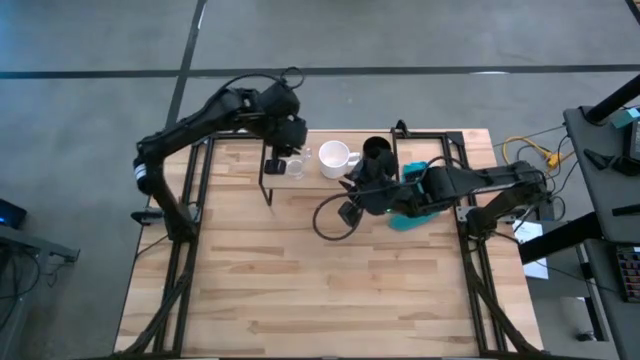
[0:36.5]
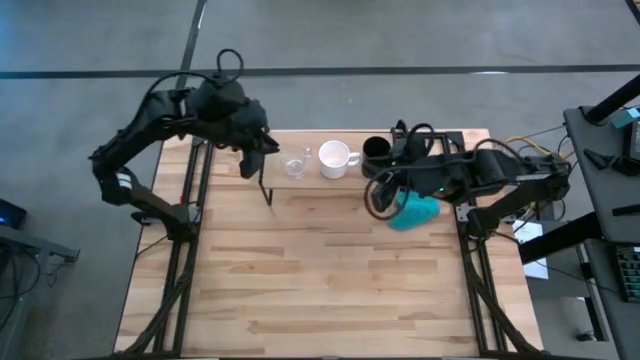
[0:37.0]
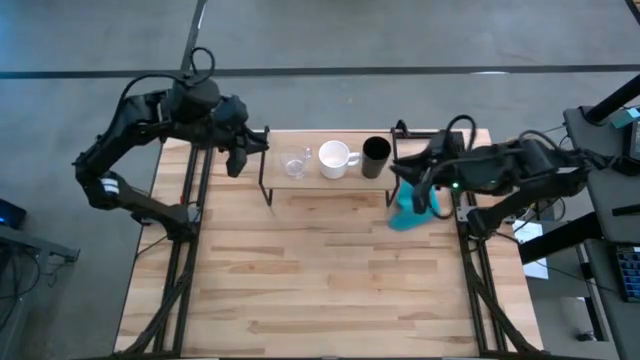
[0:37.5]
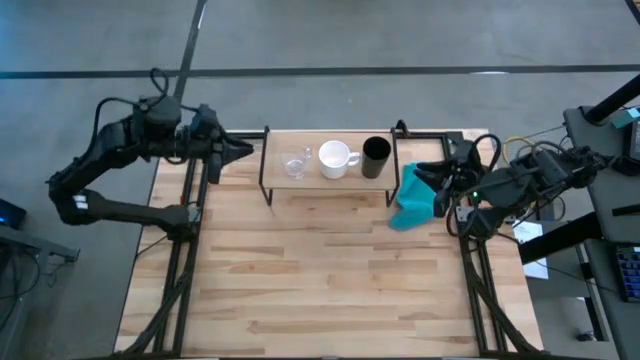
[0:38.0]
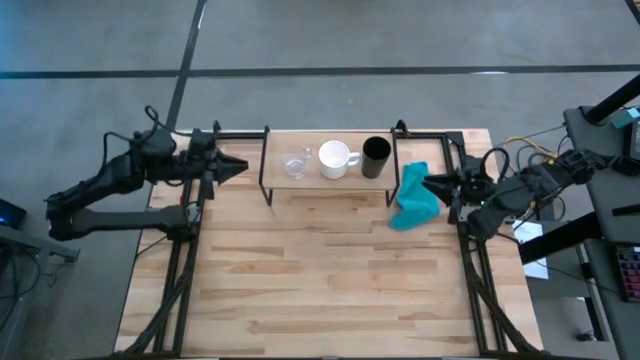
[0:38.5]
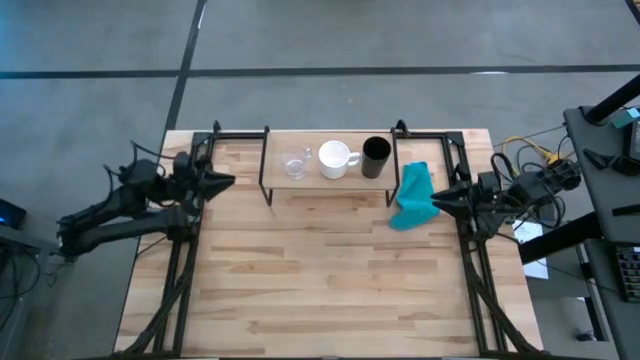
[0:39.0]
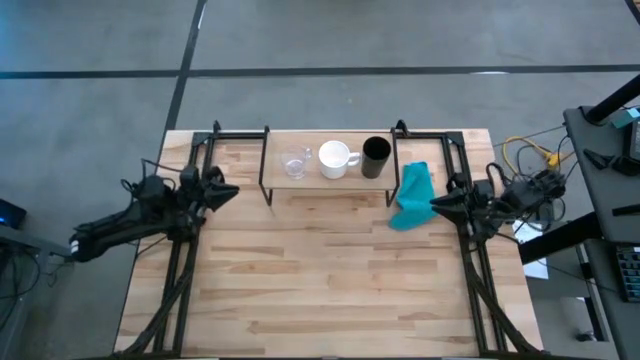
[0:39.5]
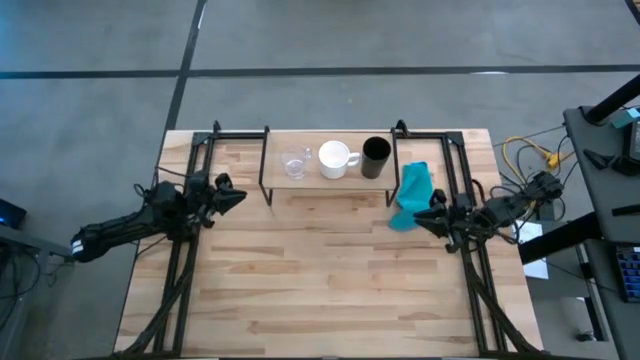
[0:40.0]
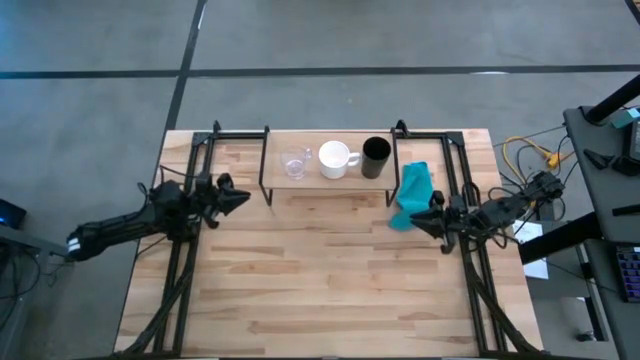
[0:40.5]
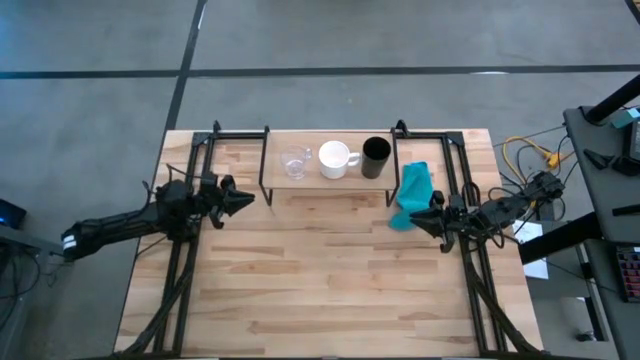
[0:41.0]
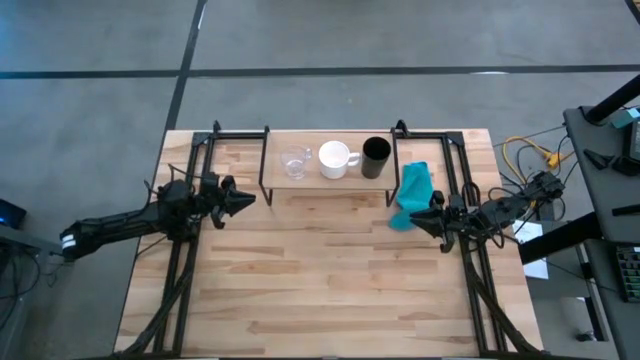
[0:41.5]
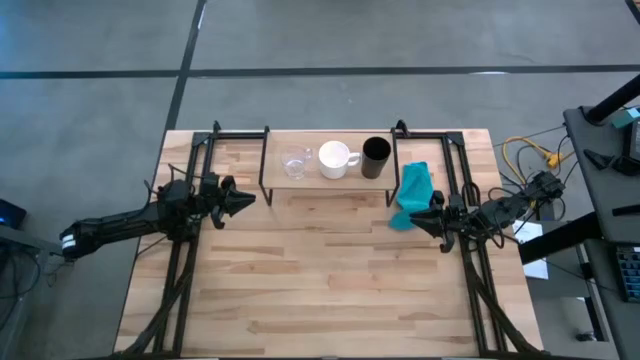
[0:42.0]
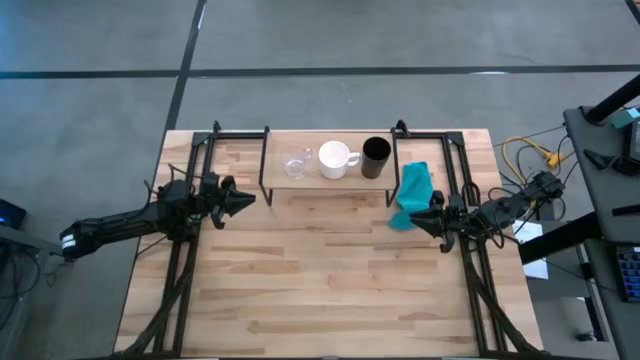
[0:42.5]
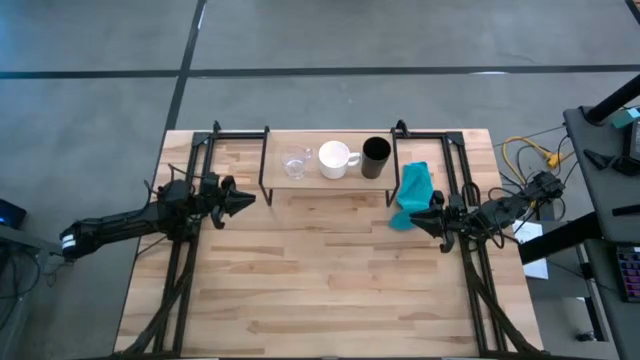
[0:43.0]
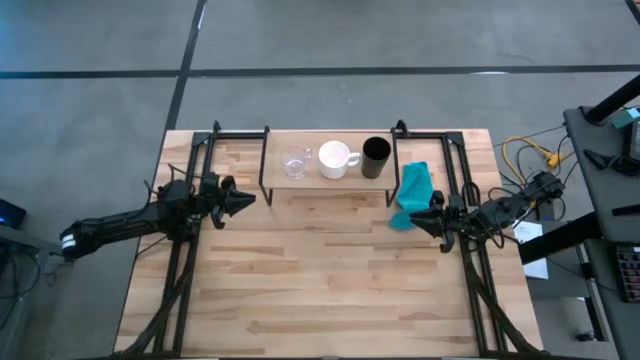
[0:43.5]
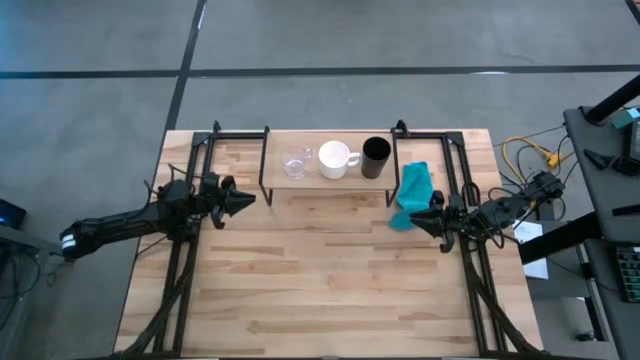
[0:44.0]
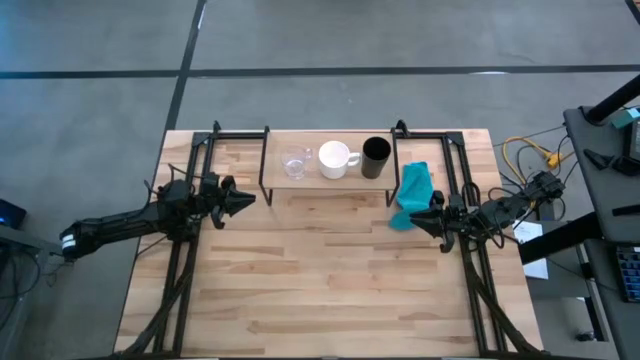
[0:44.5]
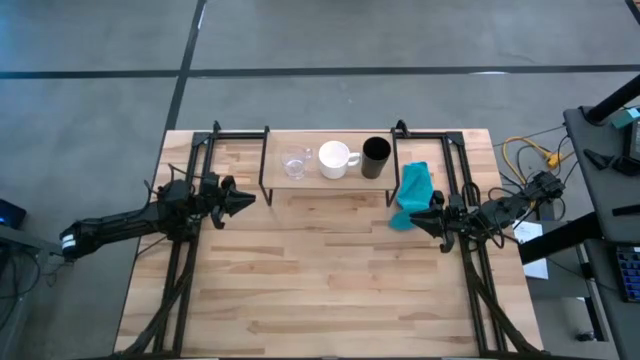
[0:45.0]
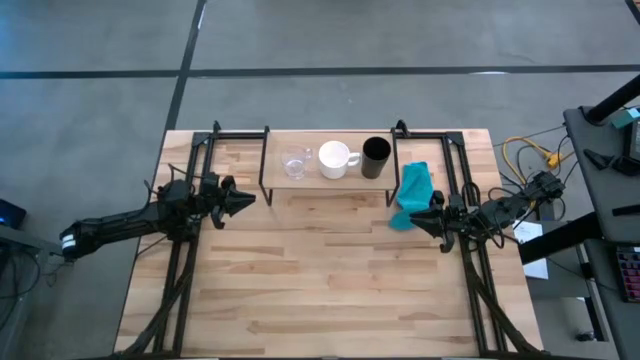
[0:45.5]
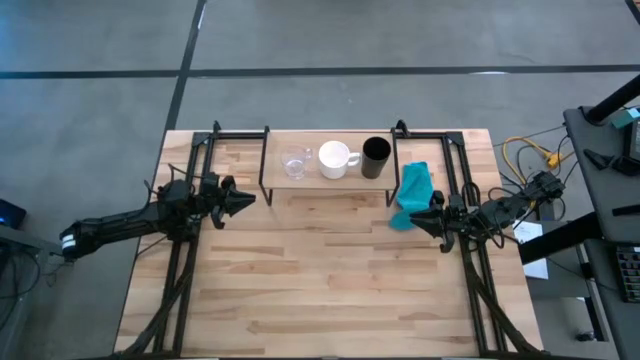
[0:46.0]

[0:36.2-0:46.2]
Task: Stack small to large cups/mugs on shelf
Return to Home Position

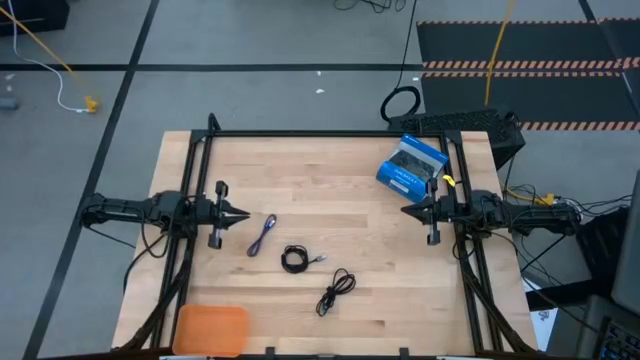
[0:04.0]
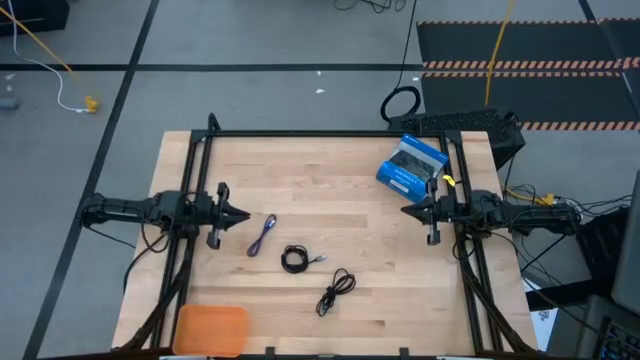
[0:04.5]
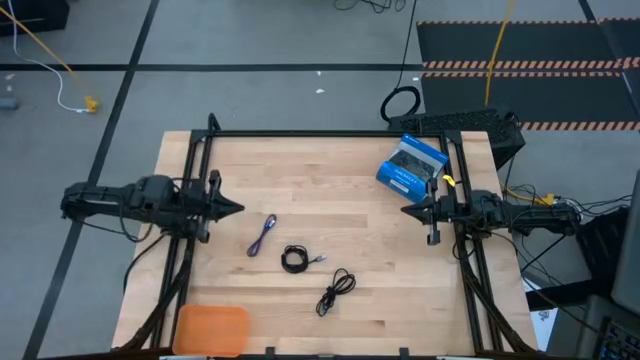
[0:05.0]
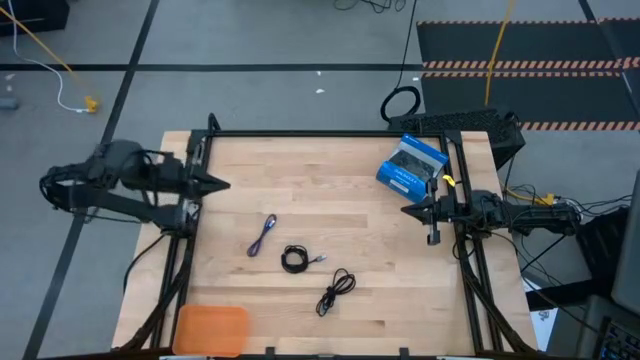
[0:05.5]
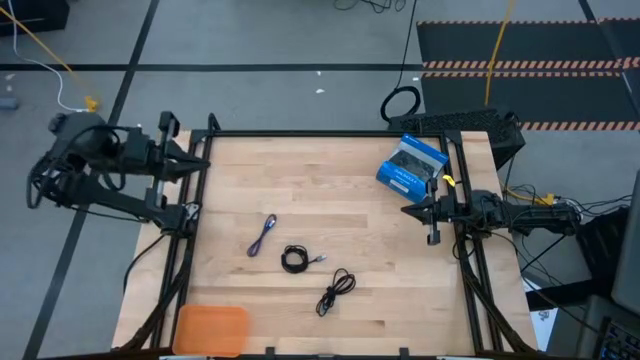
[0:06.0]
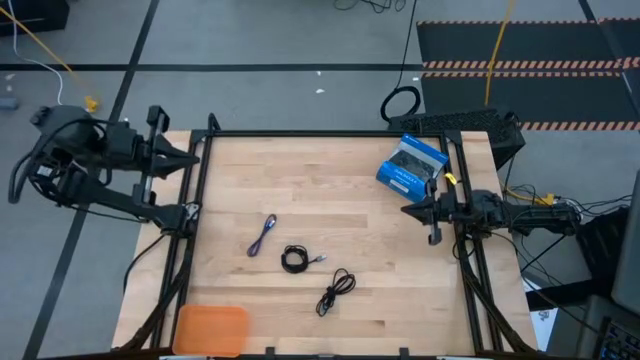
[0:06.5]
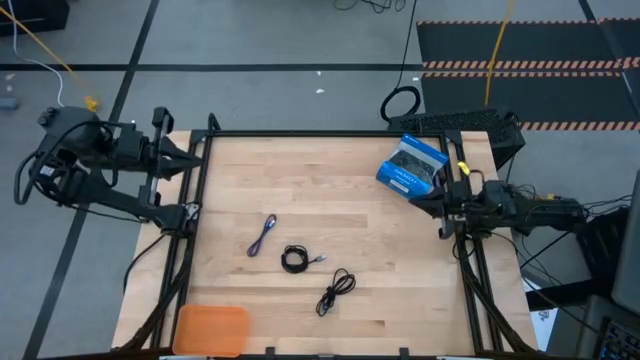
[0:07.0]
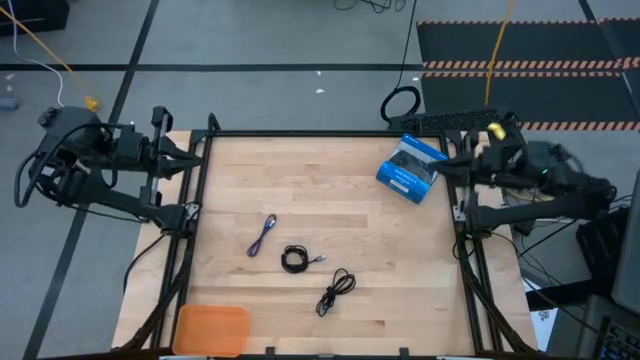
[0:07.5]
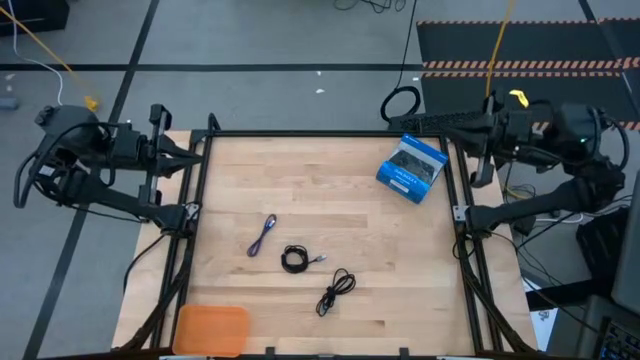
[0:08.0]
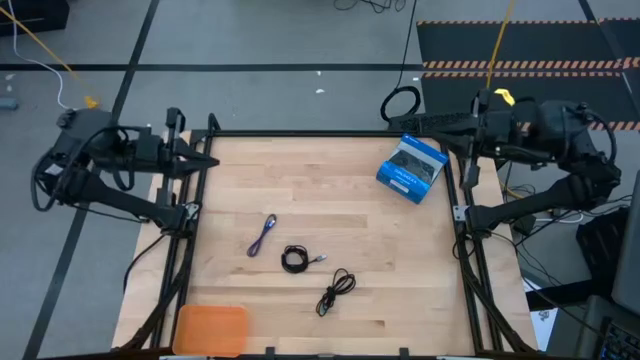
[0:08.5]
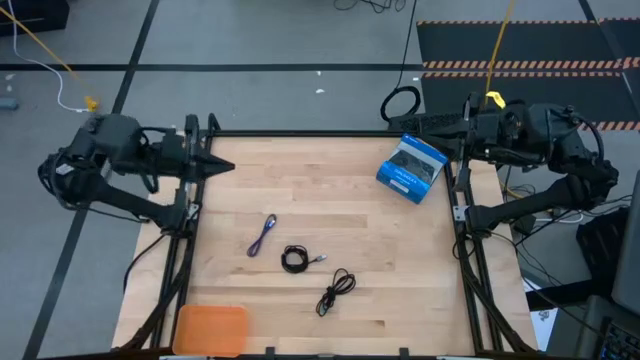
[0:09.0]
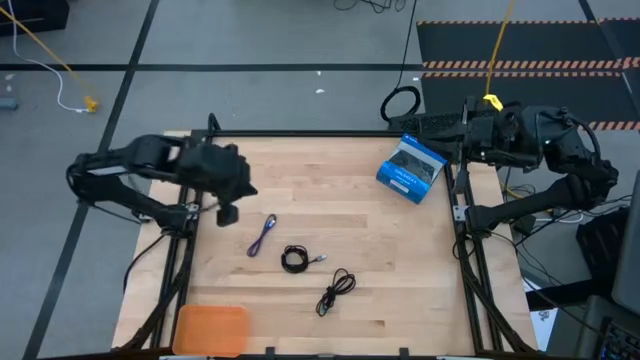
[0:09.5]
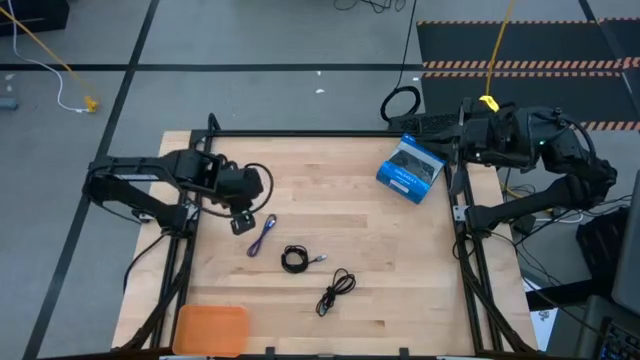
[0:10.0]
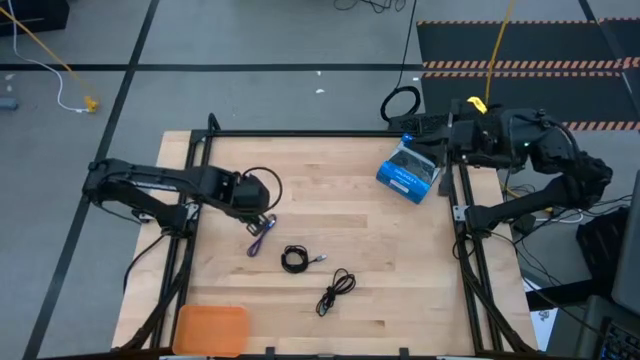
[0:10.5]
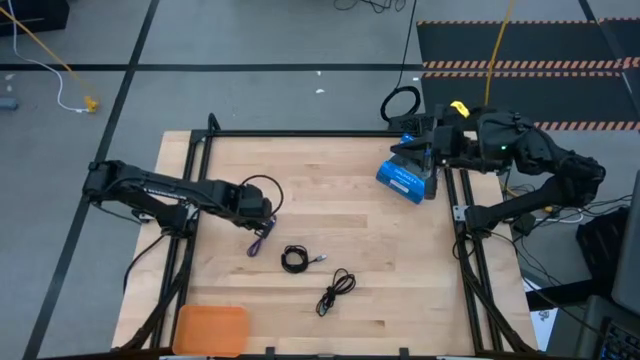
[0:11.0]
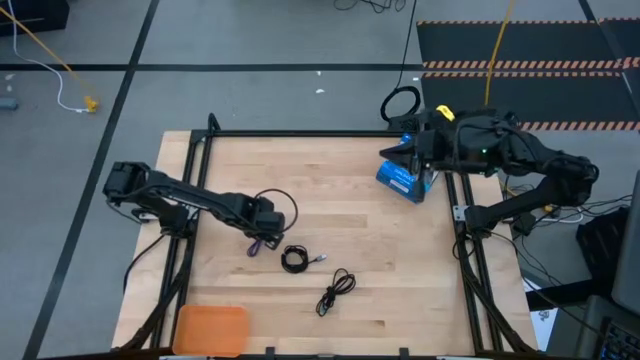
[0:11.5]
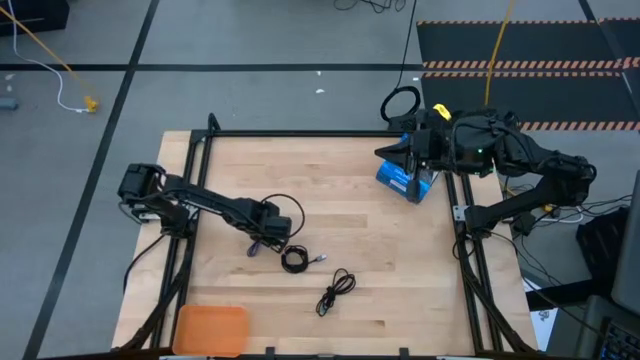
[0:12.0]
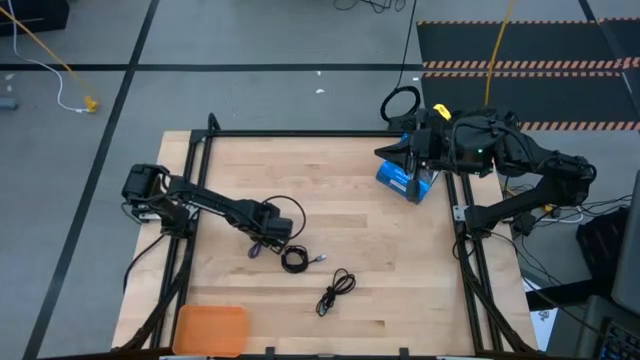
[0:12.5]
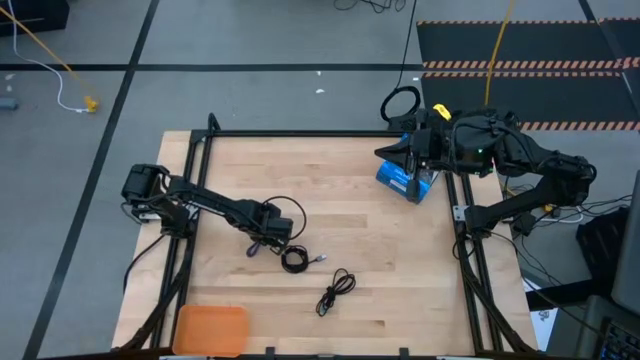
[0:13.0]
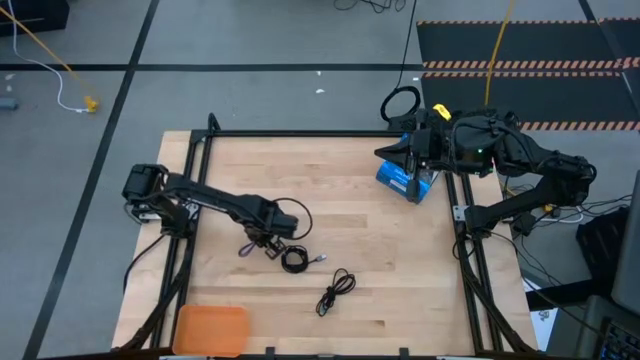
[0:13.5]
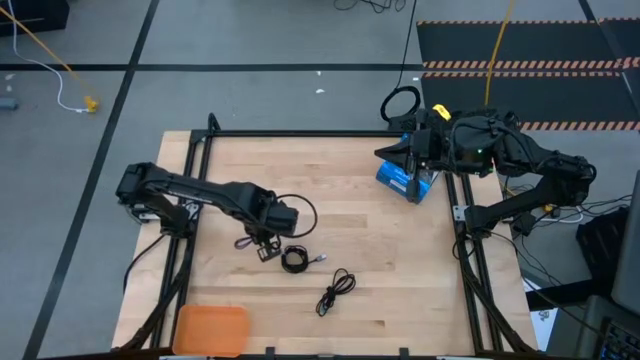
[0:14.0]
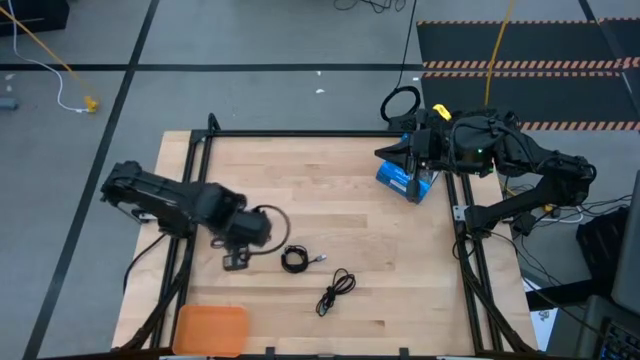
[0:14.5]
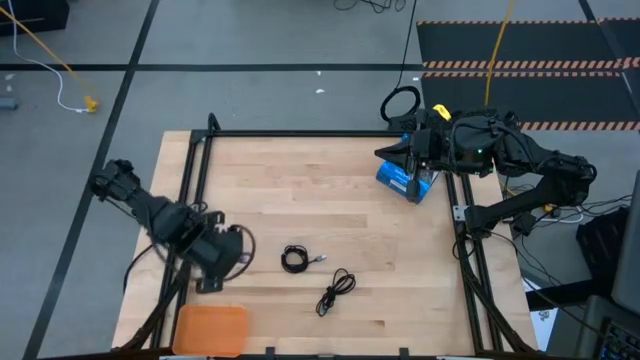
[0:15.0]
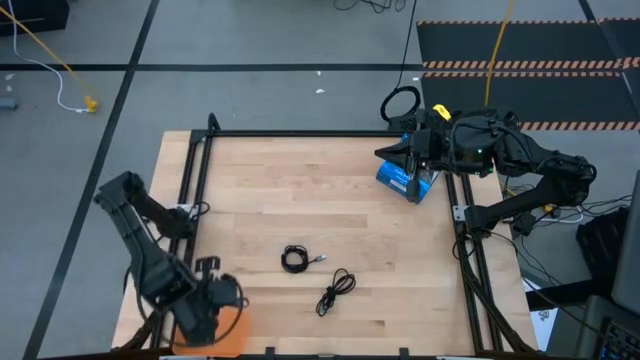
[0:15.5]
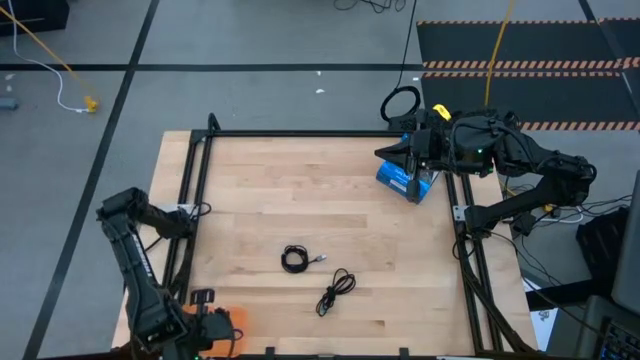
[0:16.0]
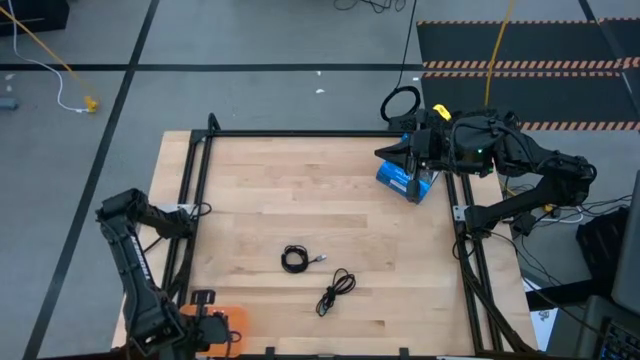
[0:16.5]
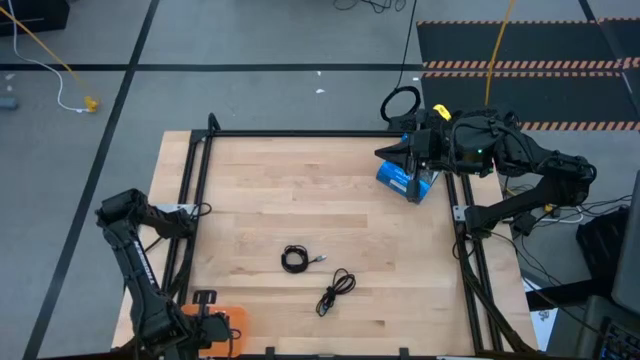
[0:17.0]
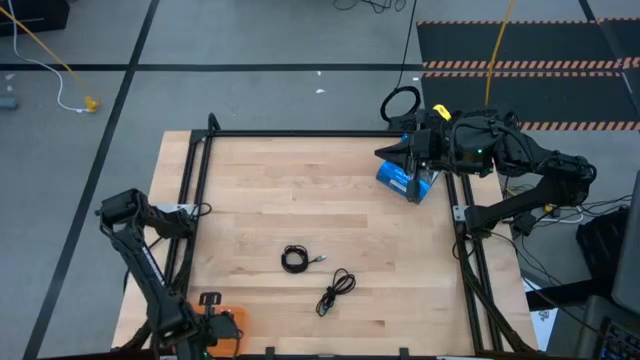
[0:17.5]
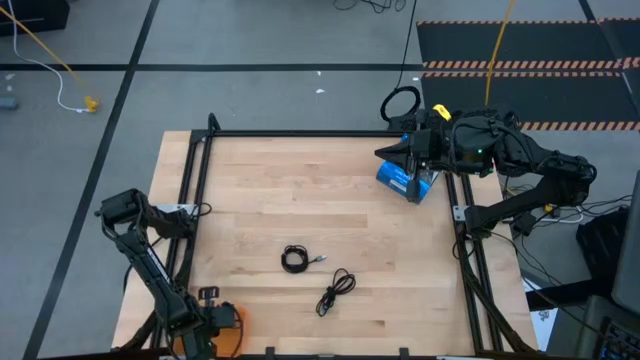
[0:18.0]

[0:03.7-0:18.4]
Task: Pick and place USB-C Cables
Put the blue patterned cable charger into the orange bin
